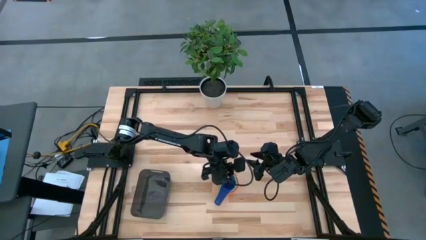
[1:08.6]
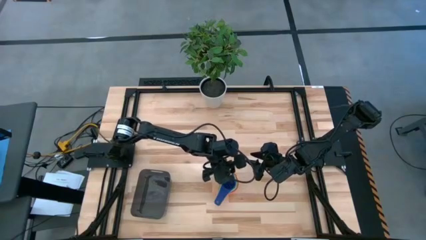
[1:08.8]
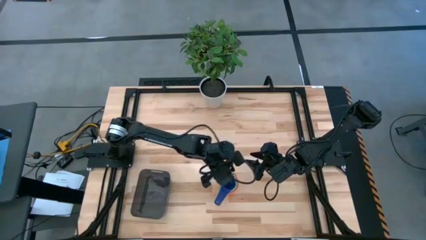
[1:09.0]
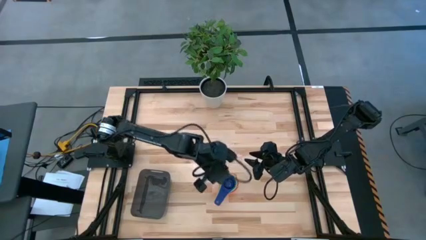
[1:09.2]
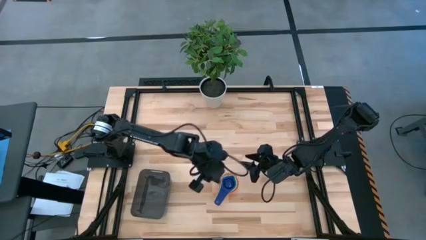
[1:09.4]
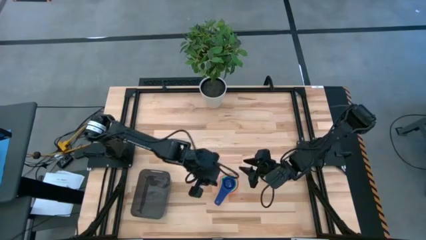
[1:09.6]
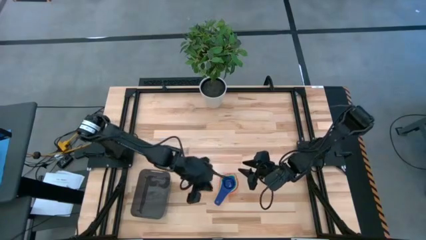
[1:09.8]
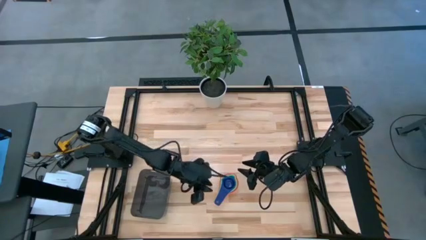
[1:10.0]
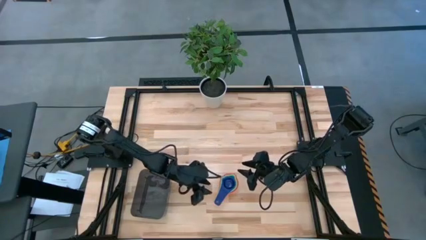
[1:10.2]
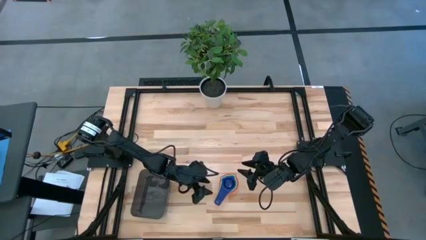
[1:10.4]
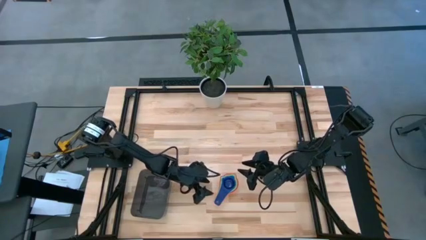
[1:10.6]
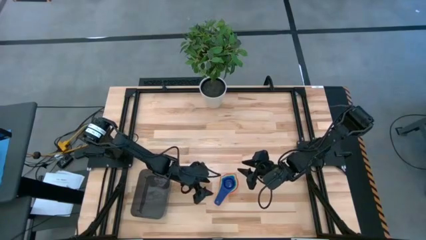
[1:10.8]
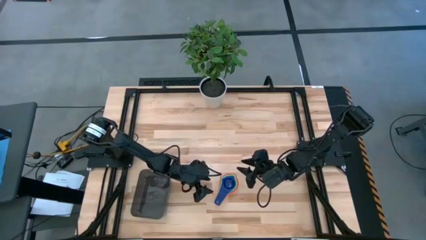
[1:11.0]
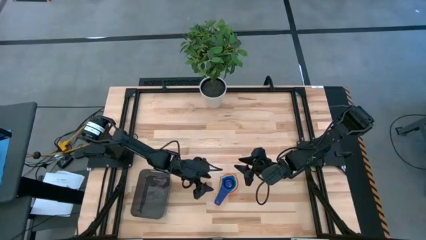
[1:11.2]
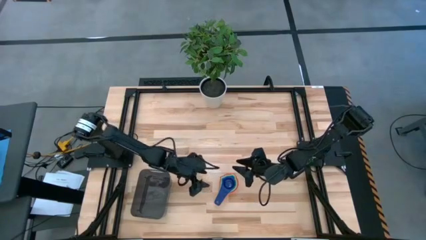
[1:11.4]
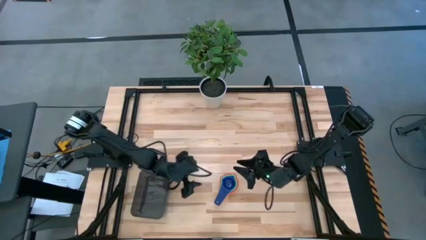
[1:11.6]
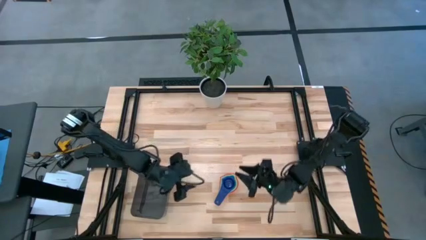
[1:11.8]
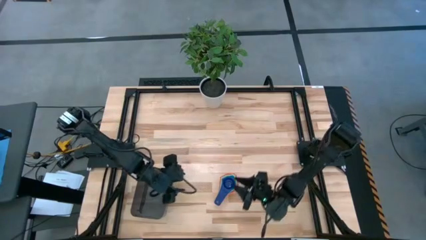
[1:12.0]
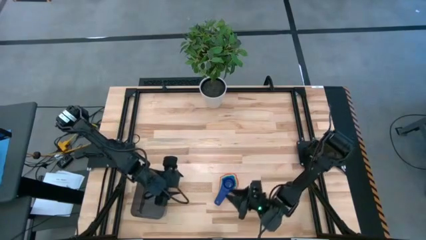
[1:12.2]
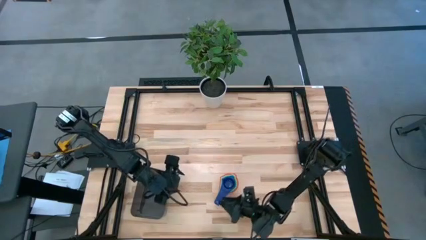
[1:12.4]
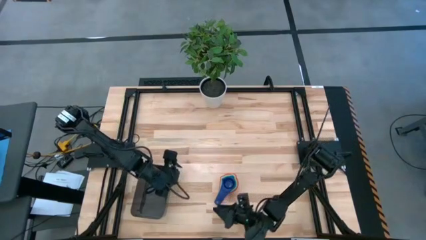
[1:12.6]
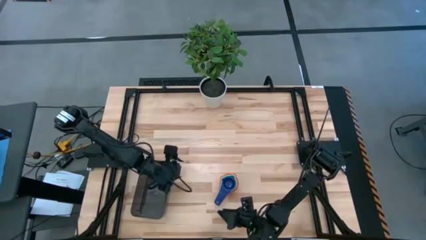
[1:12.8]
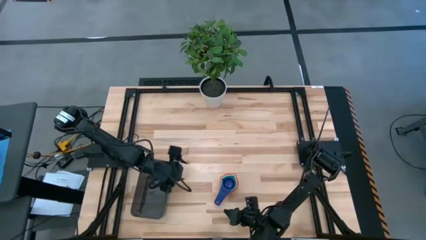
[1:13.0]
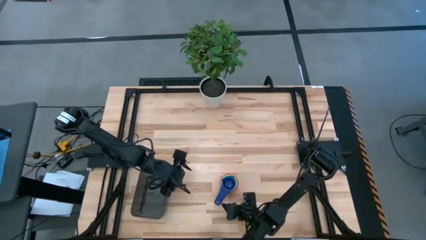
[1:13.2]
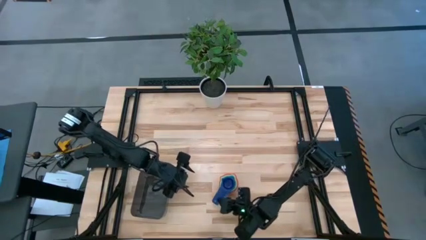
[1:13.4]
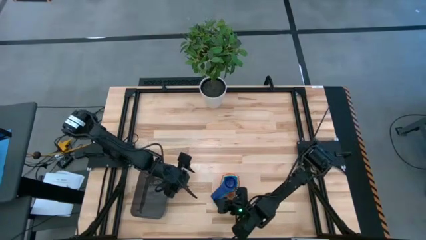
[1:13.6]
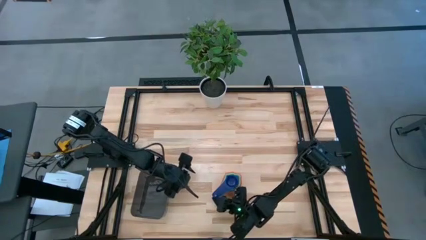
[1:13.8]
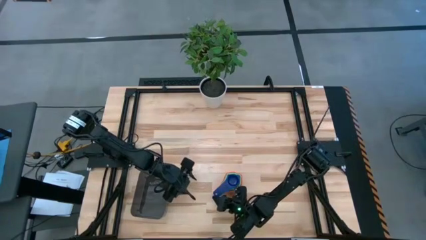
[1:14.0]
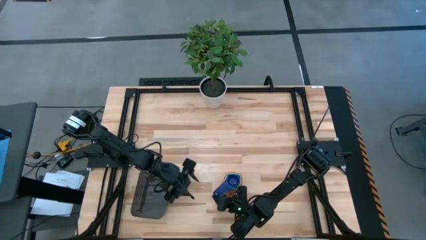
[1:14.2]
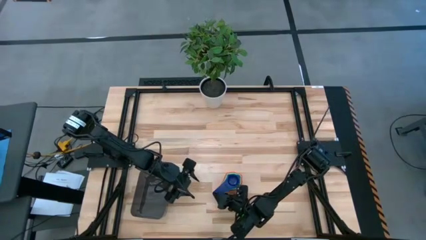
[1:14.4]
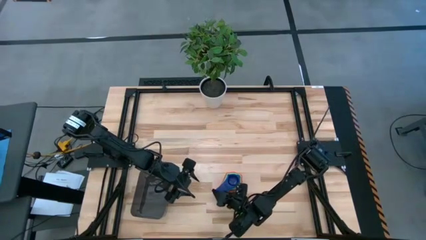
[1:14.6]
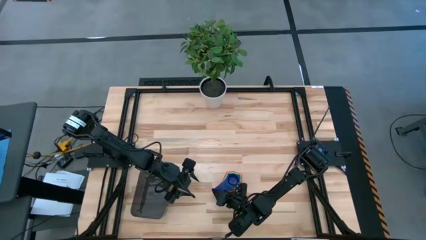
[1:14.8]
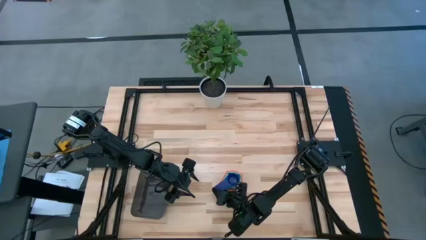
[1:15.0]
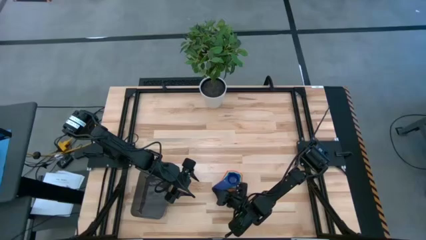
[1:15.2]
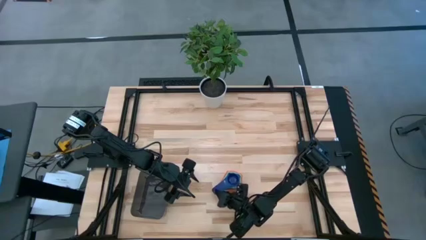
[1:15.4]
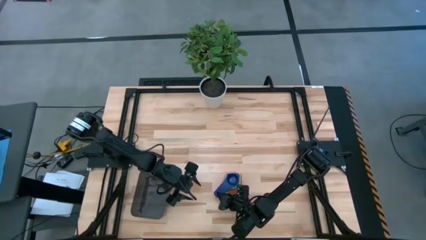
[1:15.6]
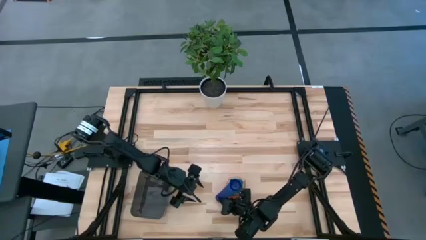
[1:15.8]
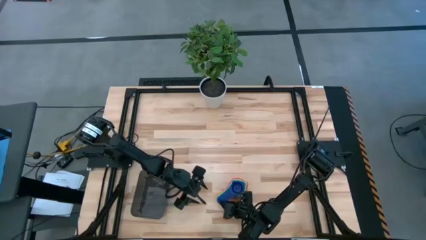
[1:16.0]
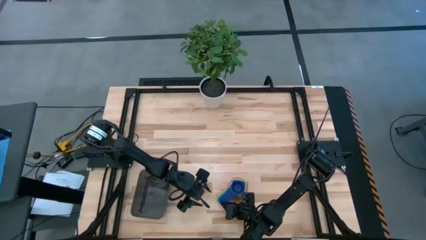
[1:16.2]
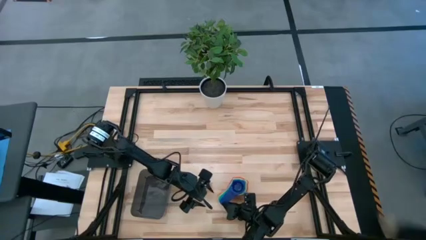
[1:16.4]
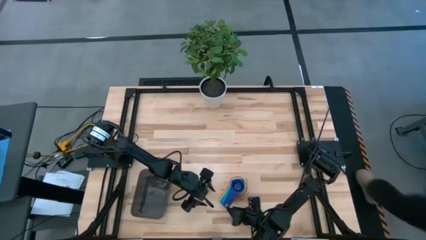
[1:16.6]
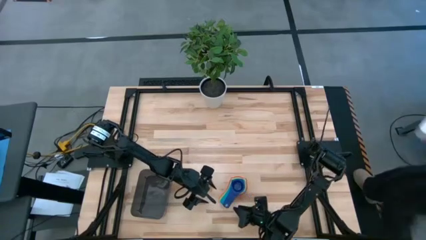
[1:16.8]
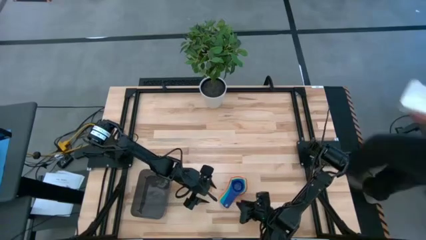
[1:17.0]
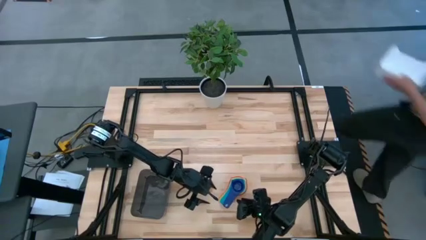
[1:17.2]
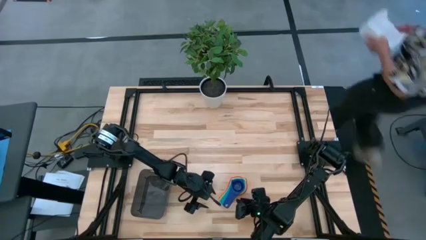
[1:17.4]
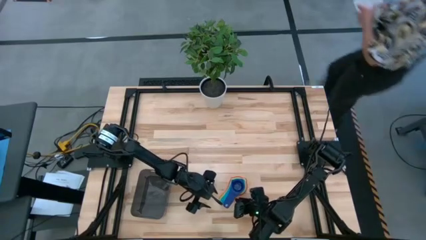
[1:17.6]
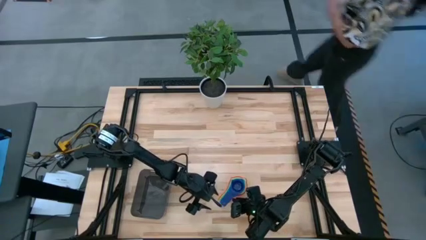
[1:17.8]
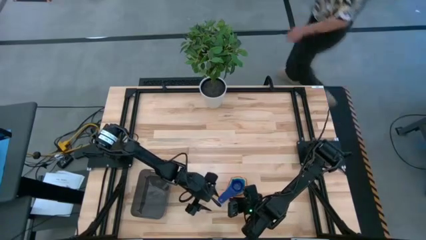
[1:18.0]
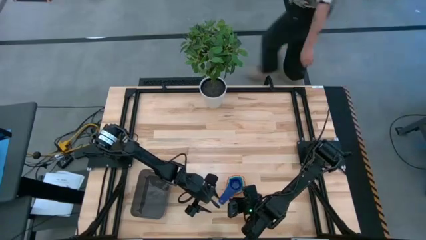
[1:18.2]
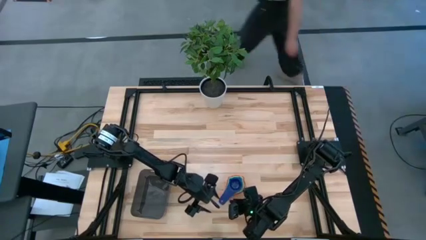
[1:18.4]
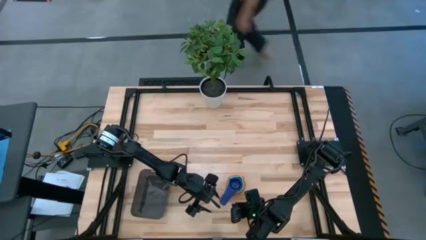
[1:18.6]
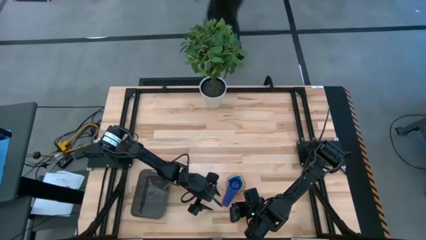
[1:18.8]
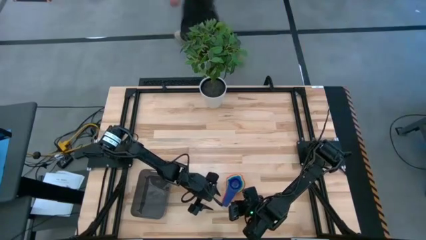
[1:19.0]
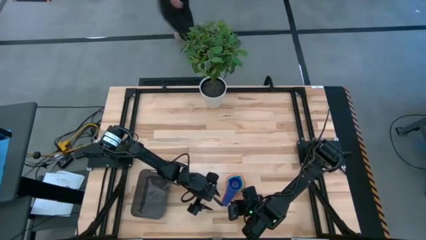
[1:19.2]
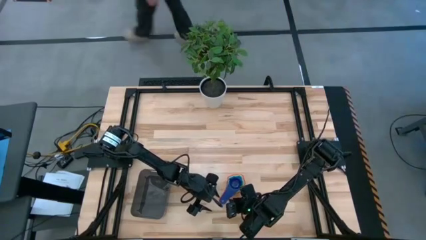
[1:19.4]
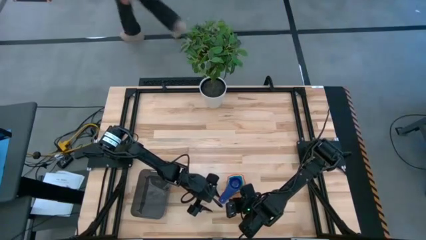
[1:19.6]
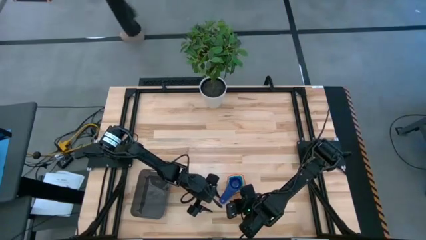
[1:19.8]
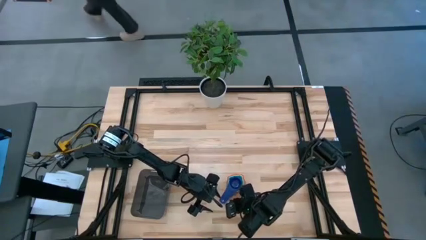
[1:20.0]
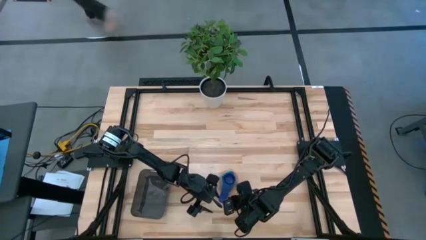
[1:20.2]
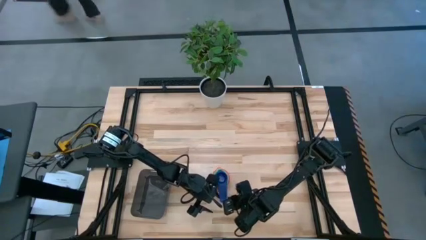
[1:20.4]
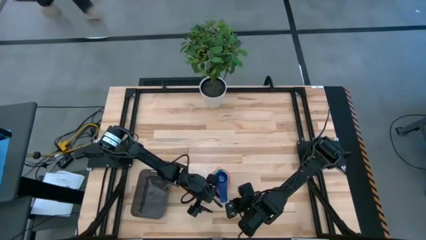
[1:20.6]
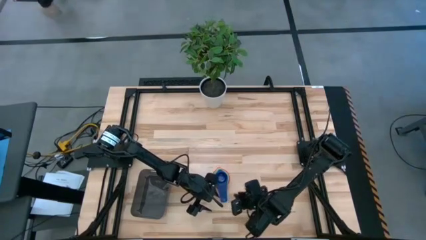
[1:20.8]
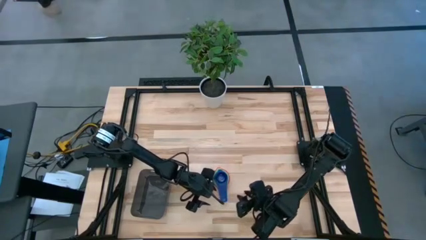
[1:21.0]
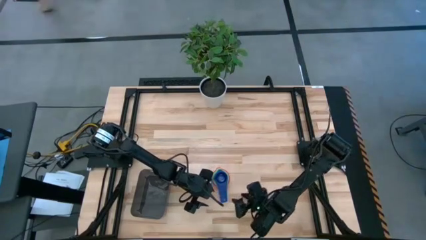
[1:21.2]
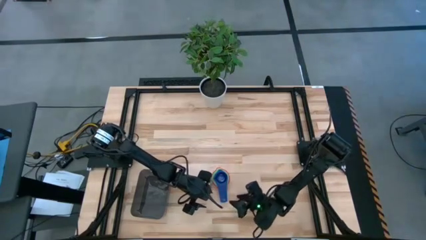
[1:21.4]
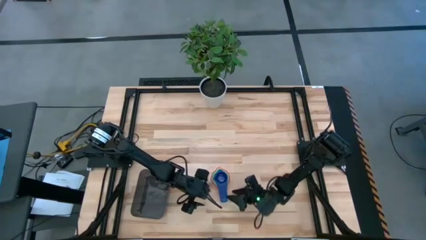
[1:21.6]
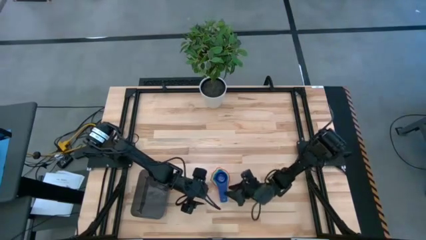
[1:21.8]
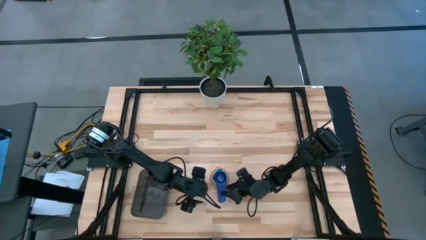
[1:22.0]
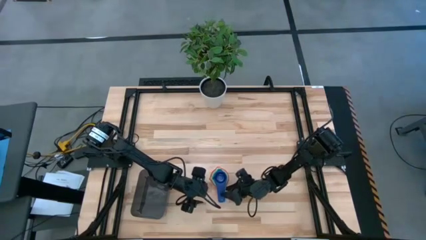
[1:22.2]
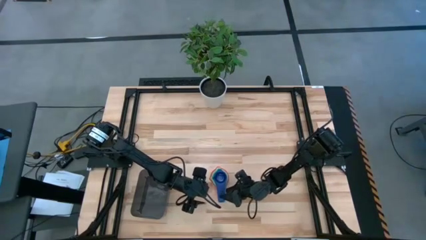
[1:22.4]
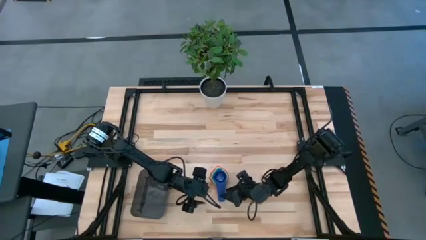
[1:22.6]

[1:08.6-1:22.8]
Task: Nest measuring cups in basket
Put the nested measuring cups into the black bin

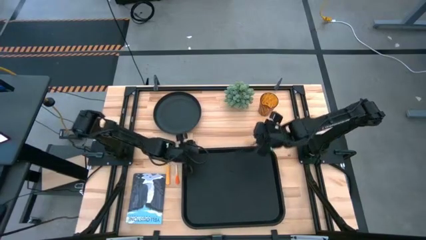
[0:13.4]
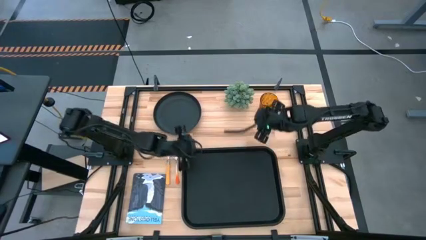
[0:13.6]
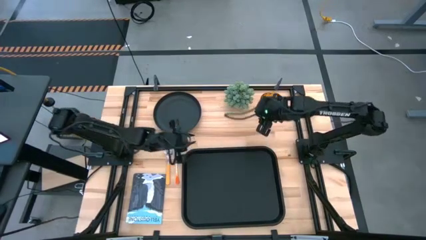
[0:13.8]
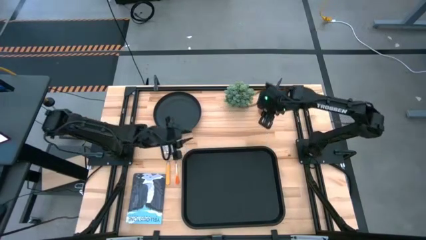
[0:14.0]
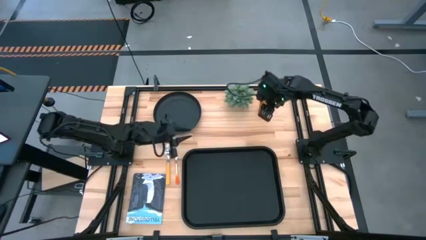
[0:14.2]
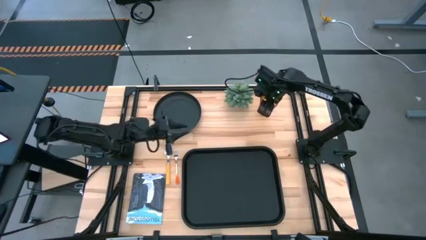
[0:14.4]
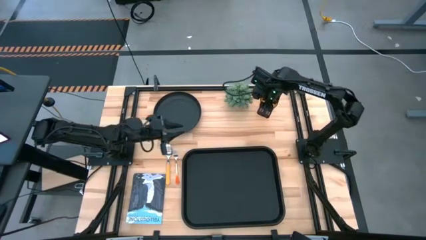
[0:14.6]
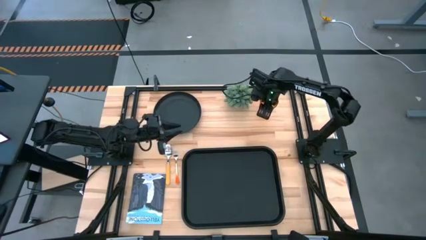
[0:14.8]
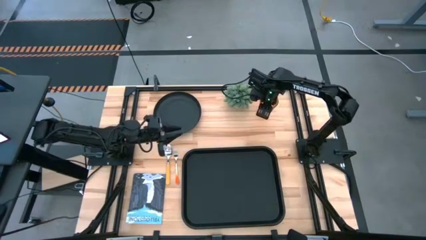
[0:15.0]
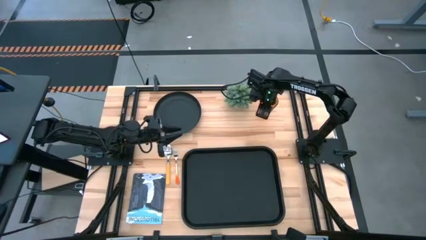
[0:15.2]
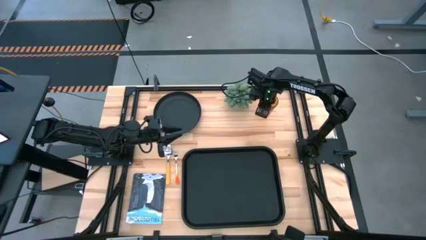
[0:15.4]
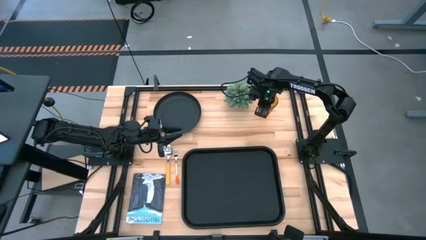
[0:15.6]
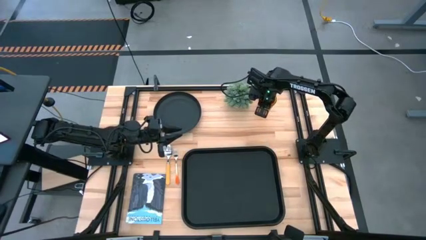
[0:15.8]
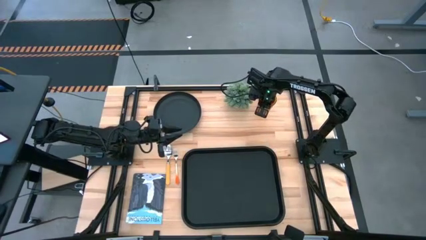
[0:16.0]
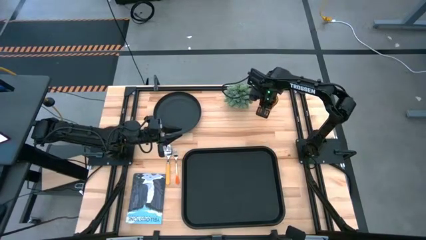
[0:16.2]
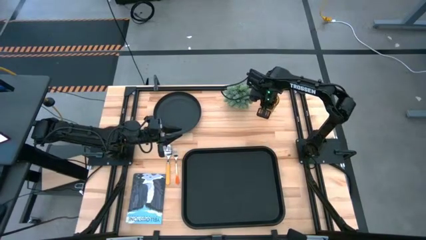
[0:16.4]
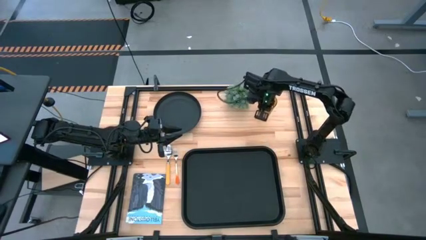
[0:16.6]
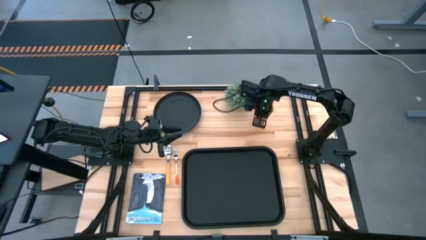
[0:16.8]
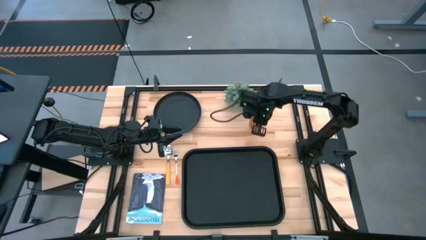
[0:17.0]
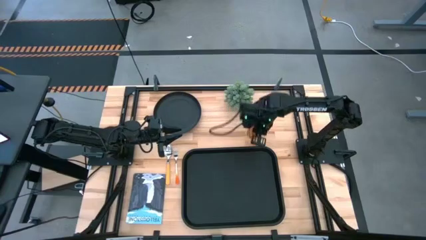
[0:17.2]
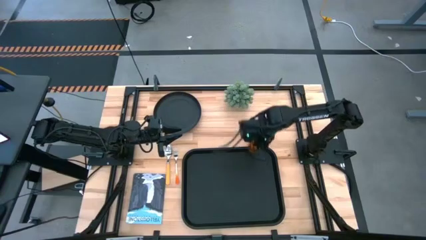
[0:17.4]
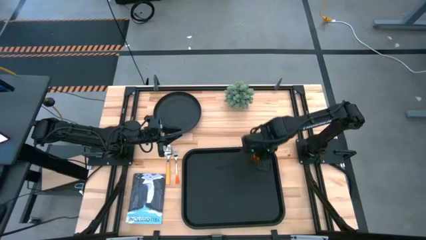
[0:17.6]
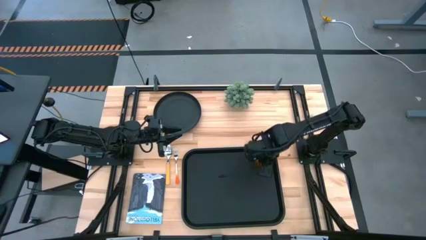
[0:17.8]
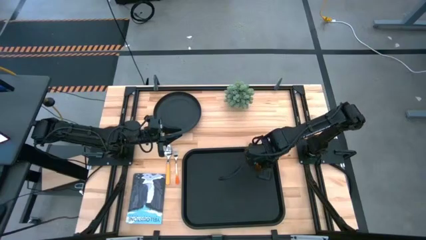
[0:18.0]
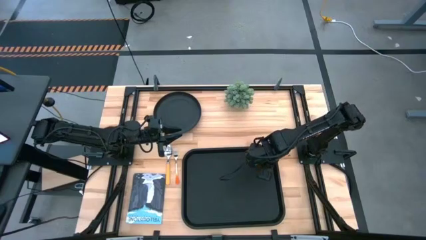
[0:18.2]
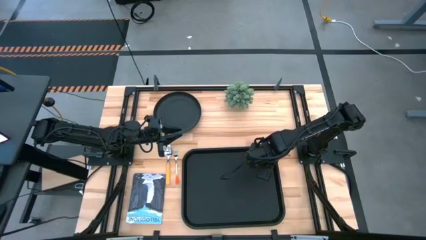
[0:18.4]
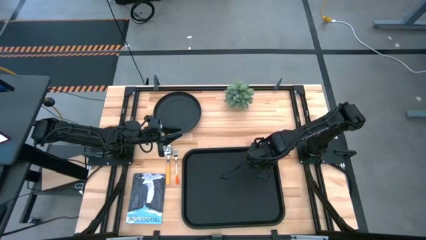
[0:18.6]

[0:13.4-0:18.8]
Task: Pick and place plate/cup/fork/spoon on tray
Put the brown glass on the top right of the black serving tray
